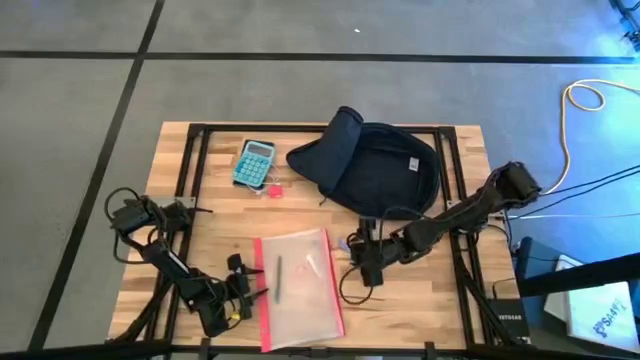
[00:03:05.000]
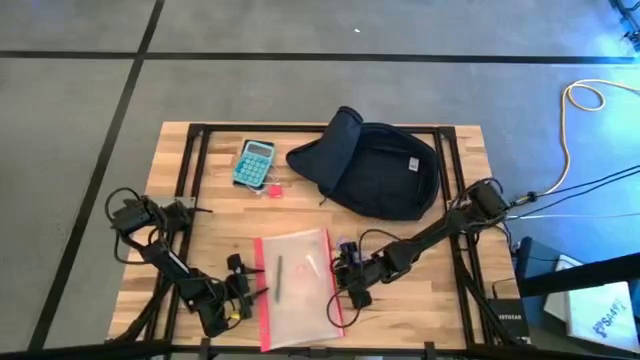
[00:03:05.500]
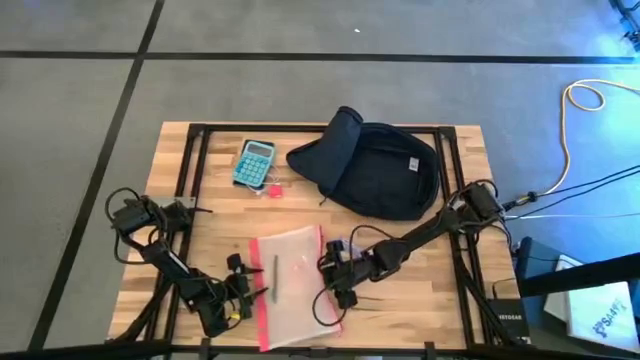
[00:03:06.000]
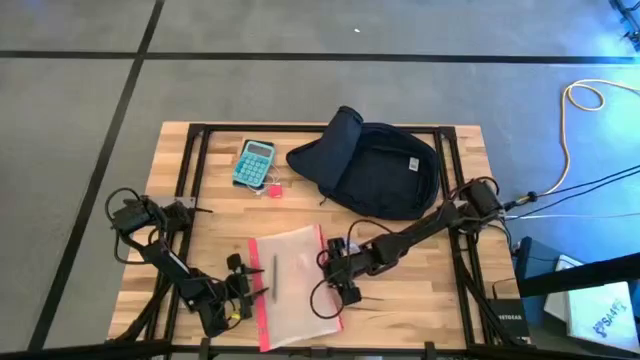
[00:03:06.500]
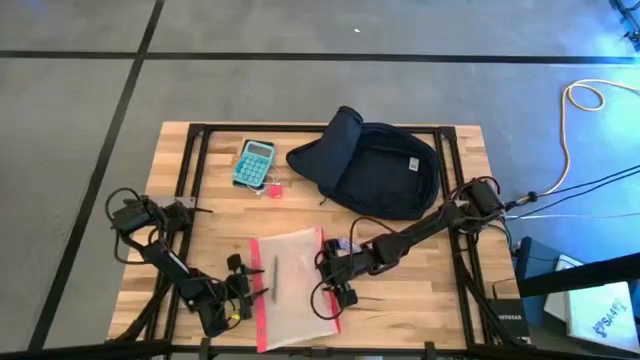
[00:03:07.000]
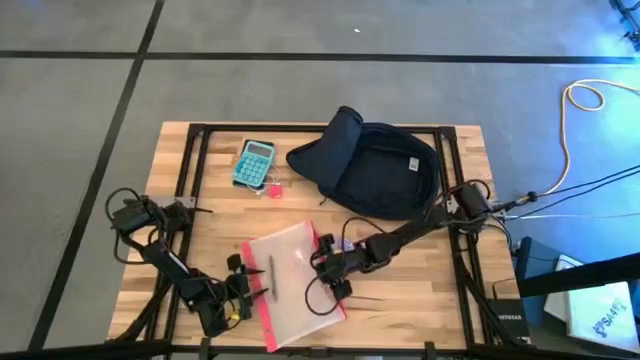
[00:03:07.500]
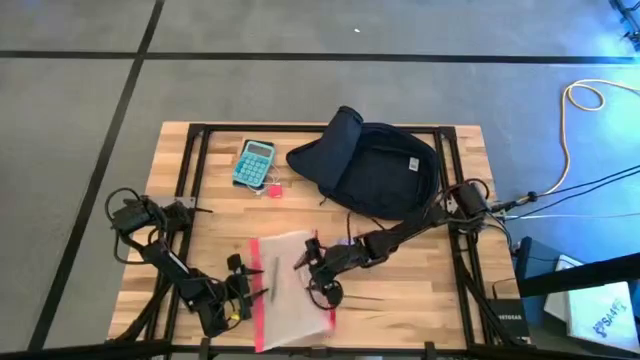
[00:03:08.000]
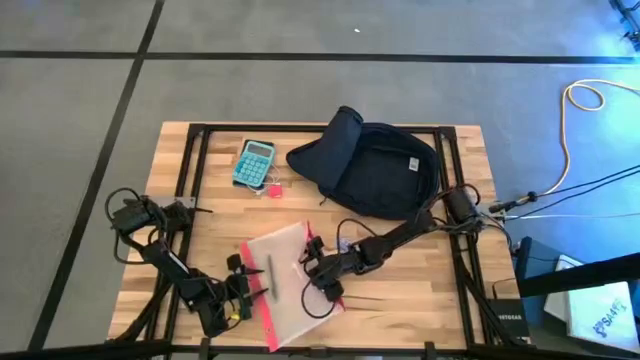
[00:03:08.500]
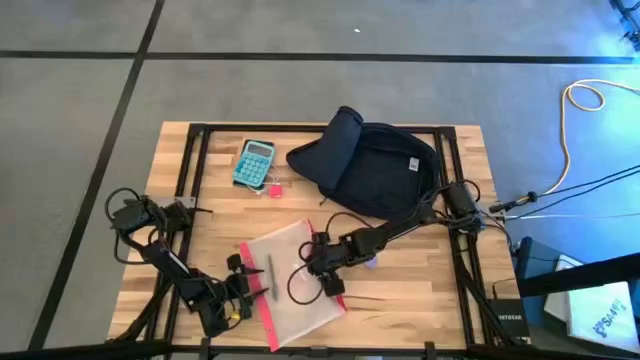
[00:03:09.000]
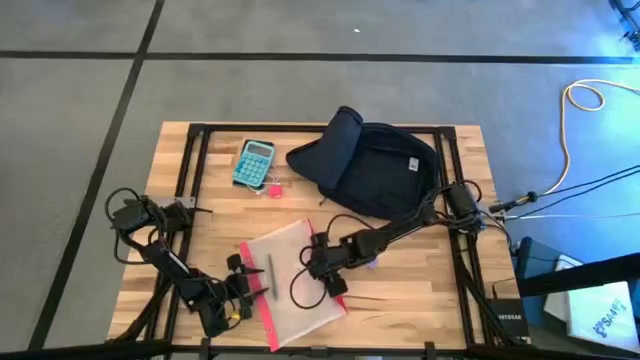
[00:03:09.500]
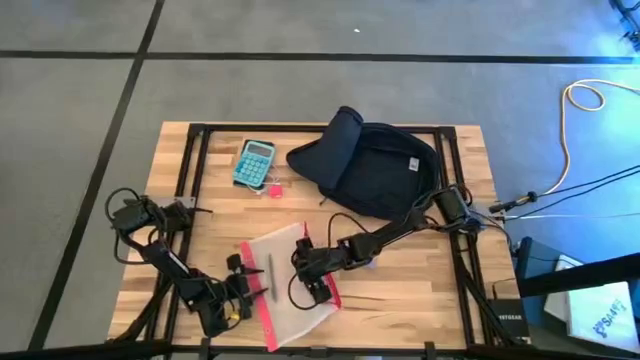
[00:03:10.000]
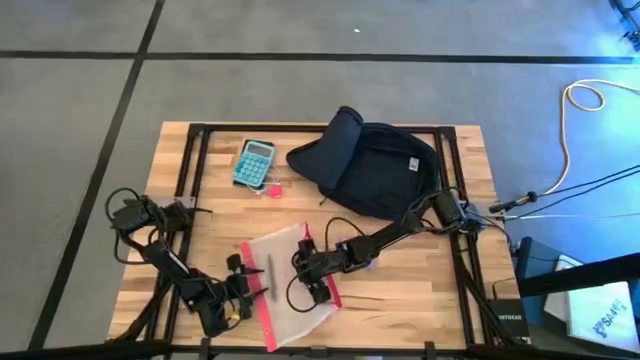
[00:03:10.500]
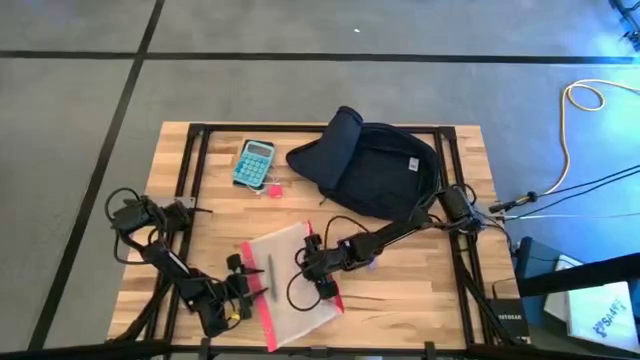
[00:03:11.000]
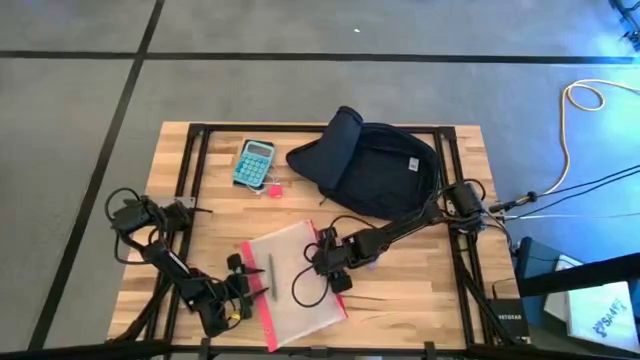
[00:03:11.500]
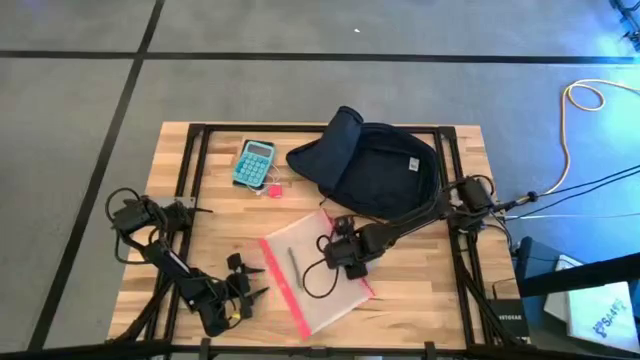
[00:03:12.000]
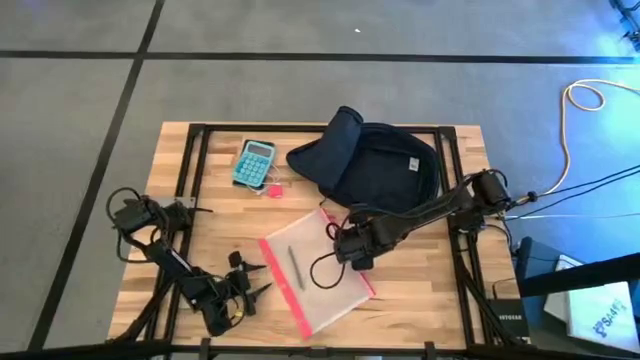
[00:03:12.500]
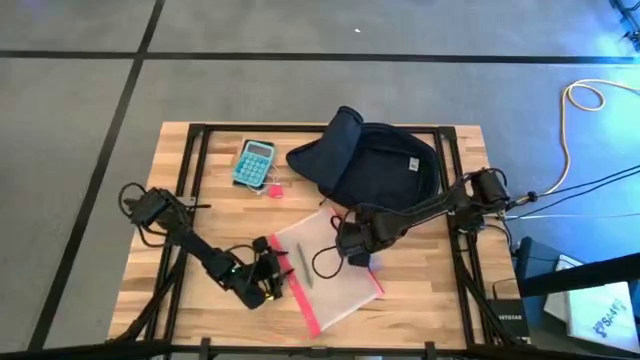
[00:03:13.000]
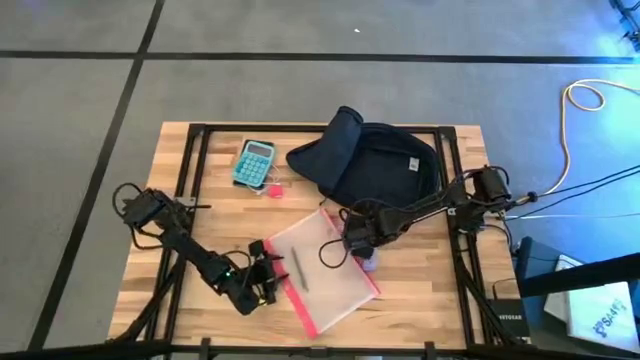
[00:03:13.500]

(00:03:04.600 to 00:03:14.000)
Task: Unpack backpack
Remove the pink earphone from the zip bag

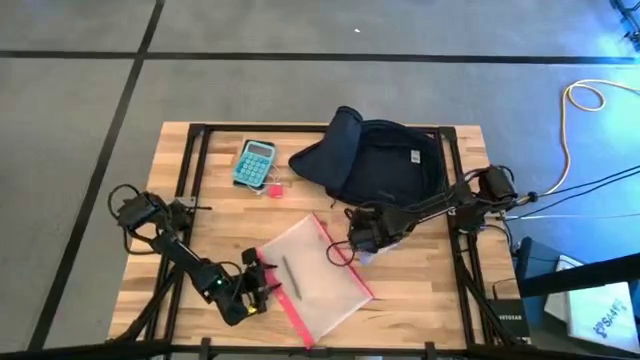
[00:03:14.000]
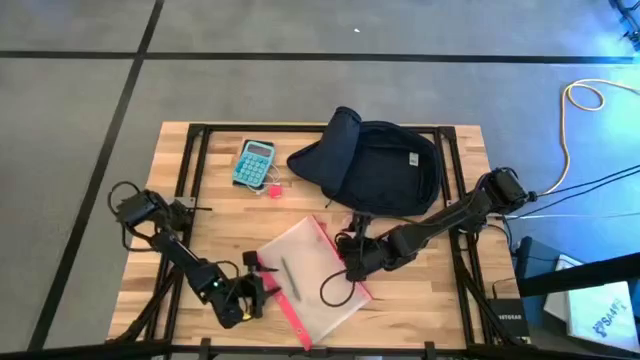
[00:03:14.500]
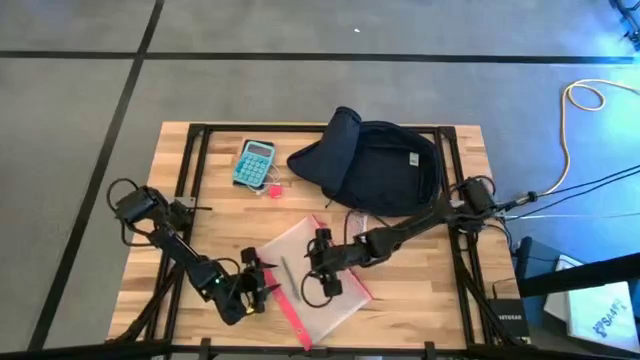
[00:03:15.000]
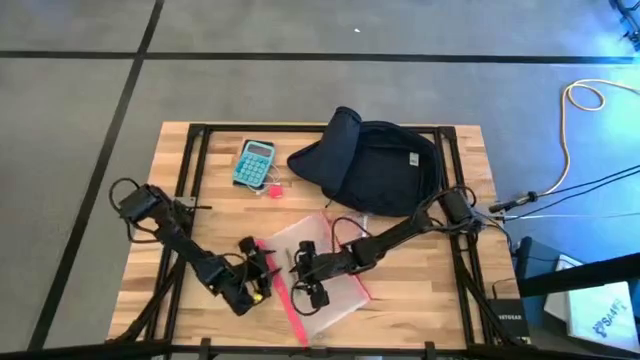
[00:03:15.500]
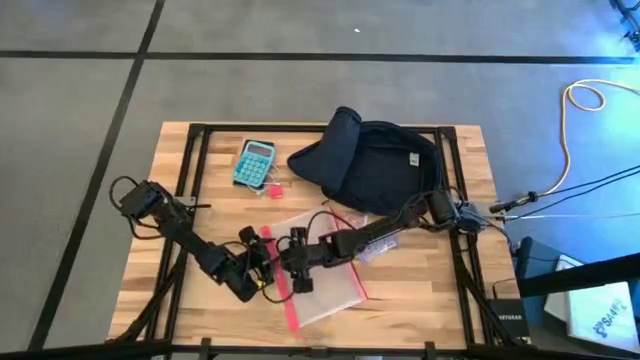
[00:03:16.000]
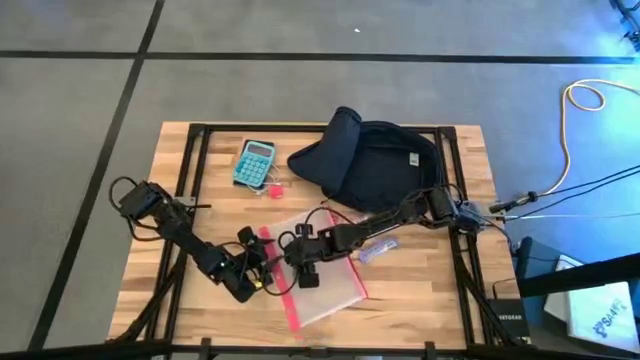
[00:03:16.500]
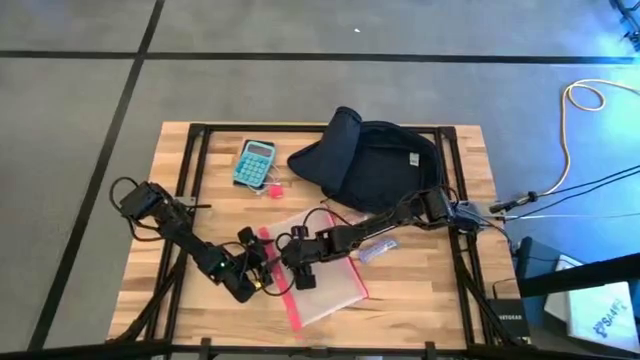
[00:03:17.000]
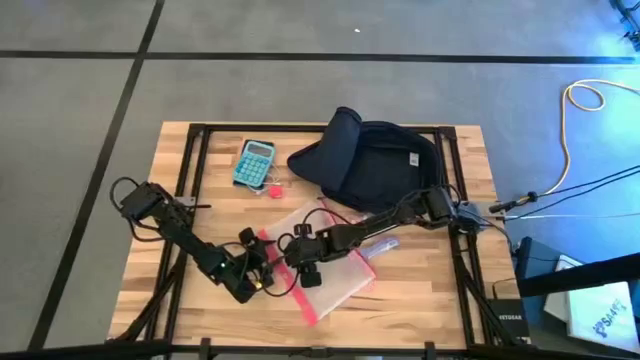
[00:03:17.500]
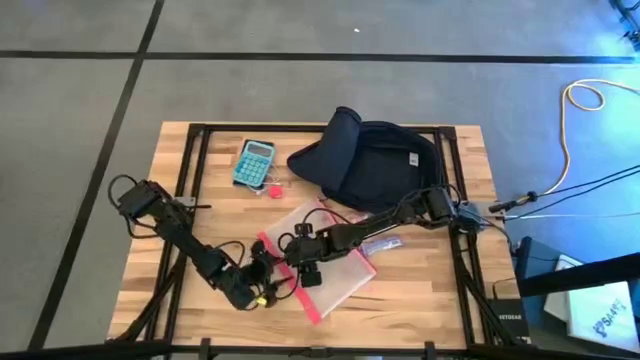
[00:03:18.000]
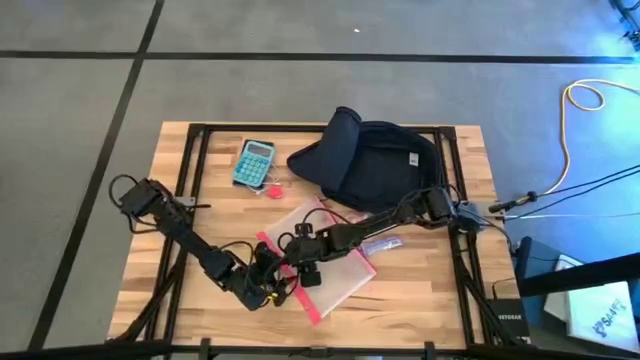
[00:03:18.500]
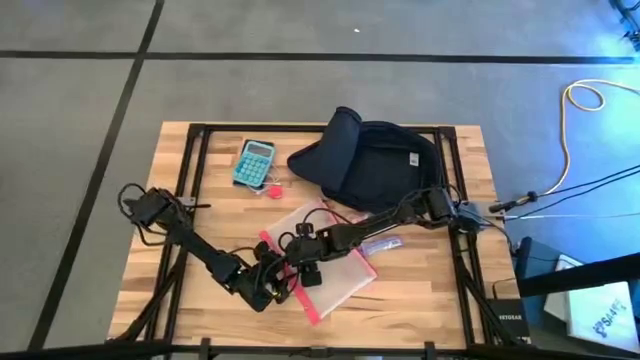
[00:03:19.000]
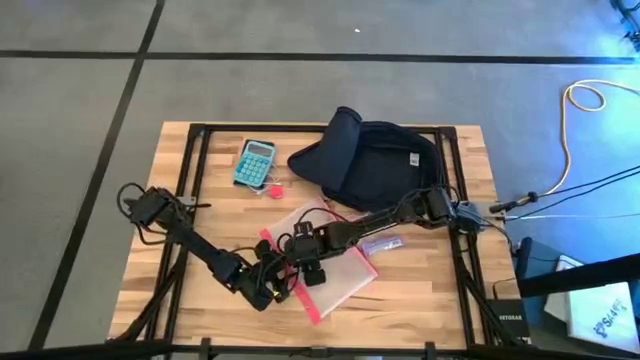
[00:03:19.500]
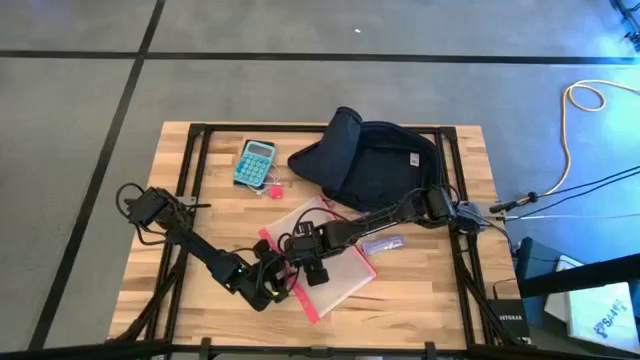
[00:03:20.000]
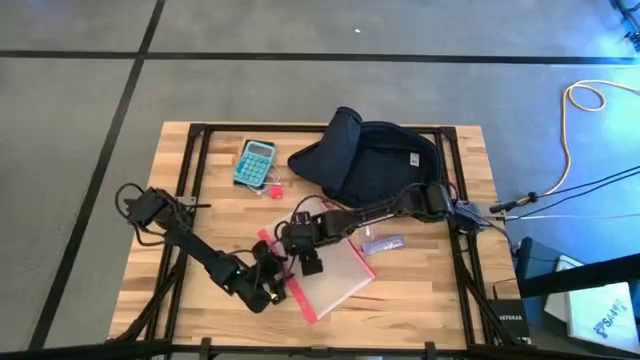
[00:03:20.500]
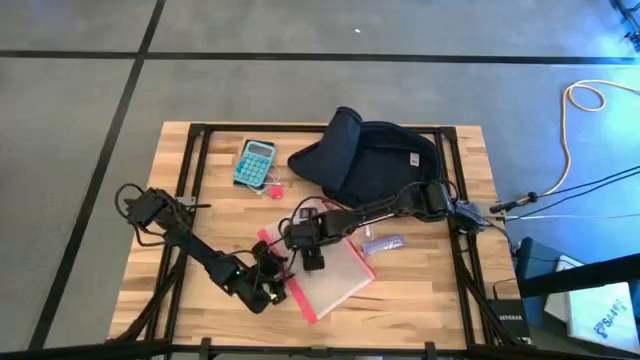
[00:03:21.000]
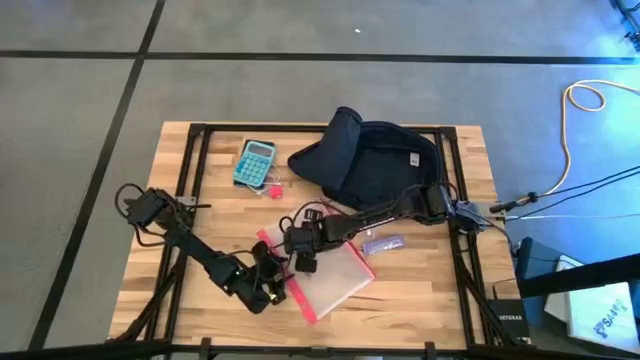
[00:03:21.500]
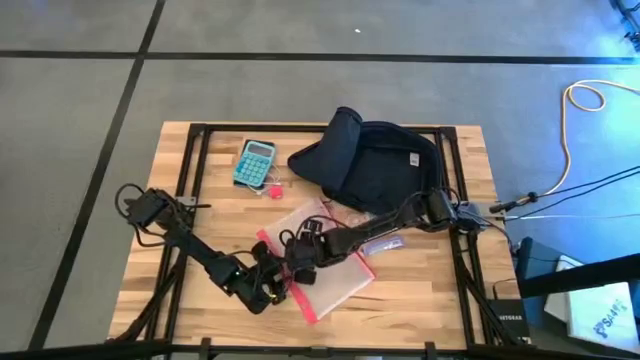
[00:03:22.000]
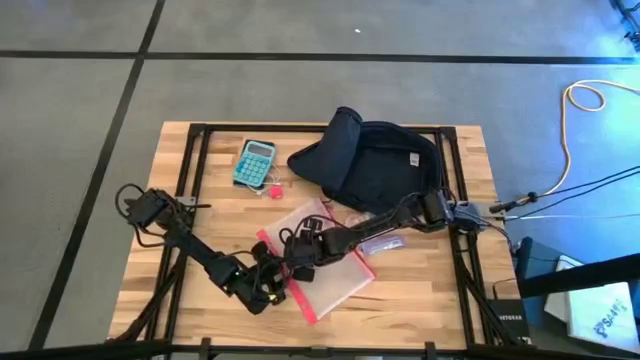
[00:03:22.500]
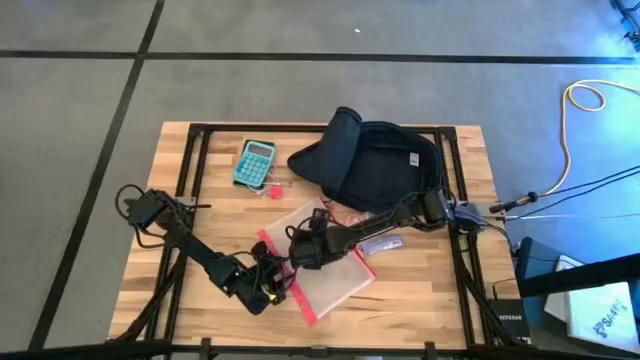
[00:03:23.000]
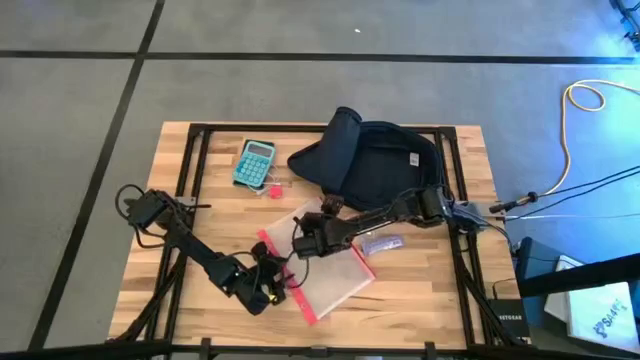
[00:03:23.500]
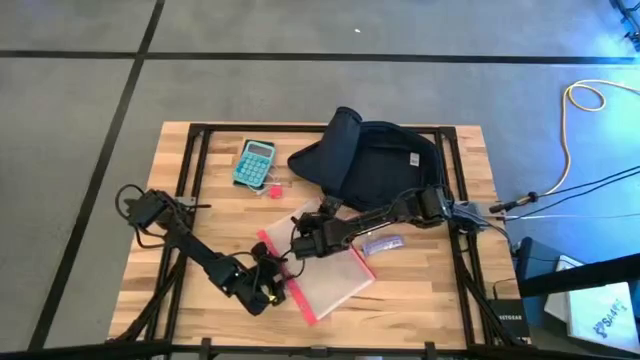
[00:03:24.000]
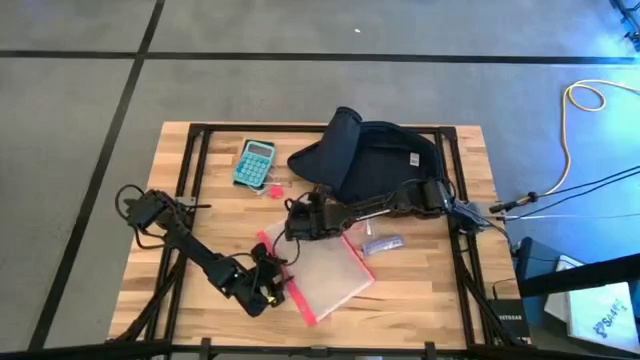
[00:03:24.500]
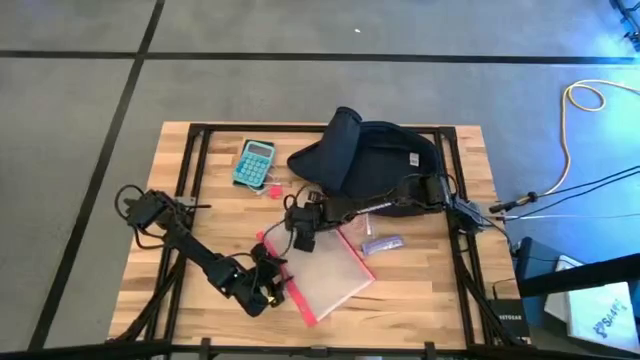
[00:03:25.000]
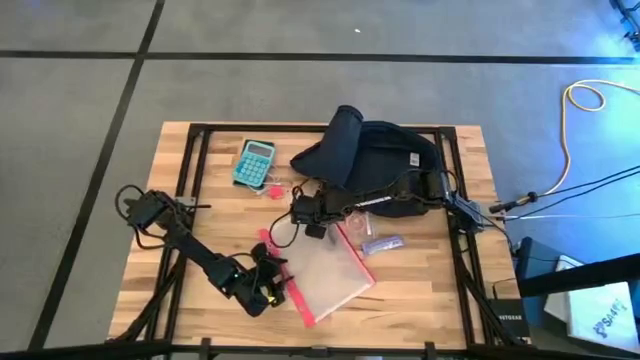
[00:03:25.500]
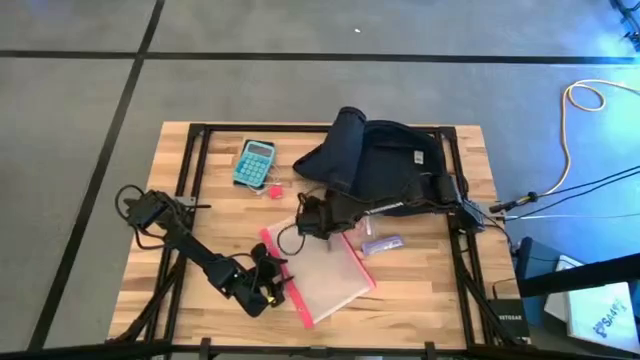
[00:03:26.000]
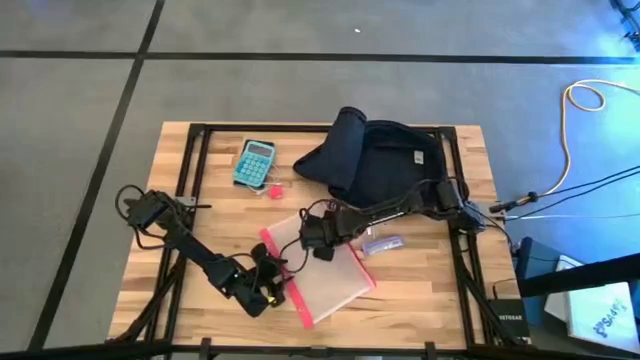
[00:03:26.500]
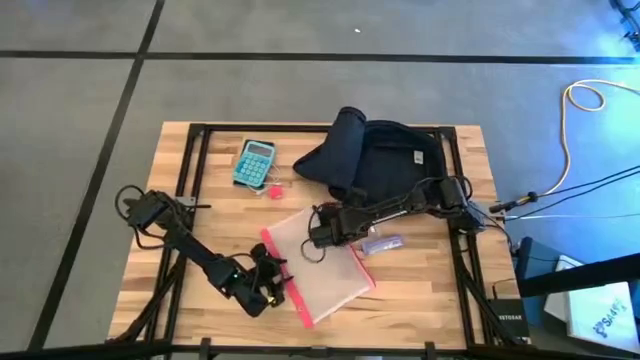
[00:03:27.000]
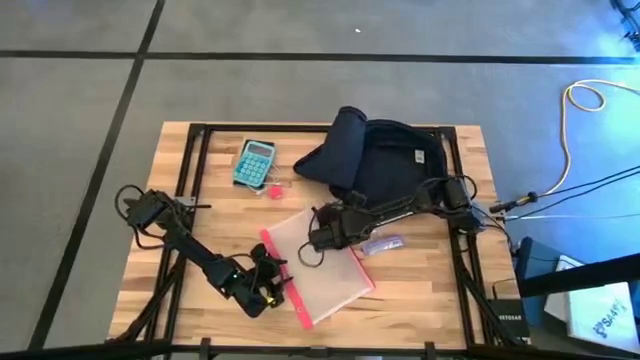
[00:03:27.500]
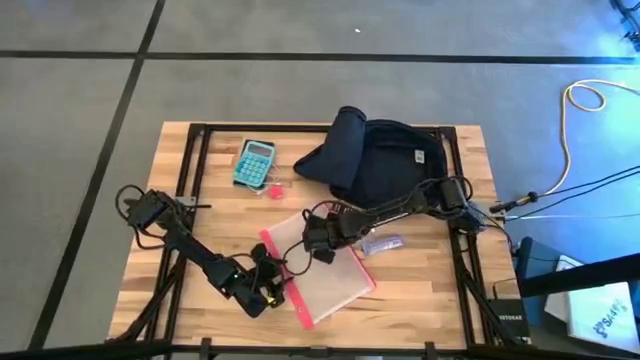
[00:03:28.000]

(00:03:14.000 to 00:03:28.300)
Remove the black pen from the transparent zip bag
